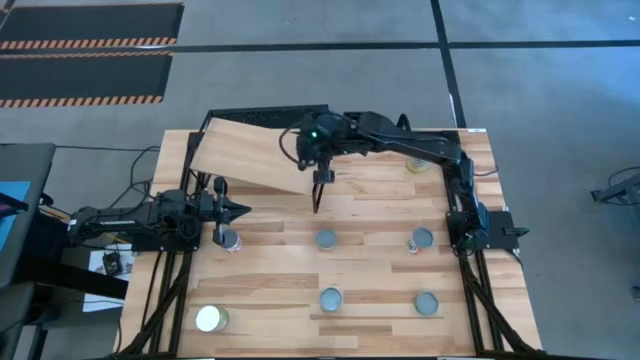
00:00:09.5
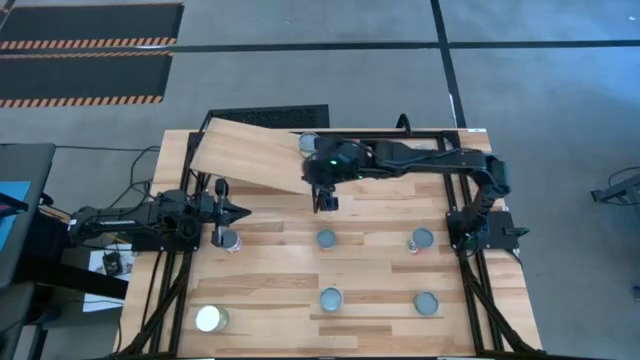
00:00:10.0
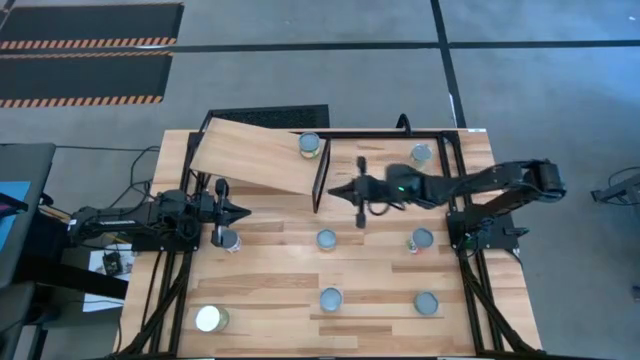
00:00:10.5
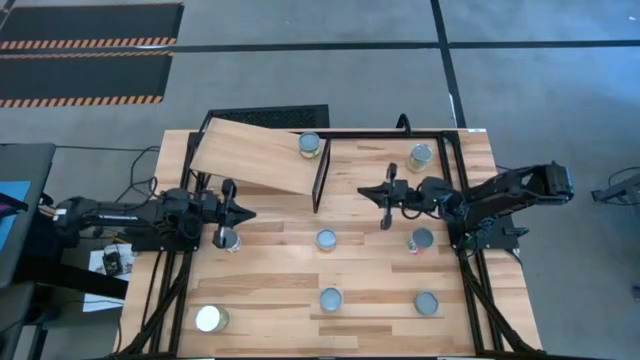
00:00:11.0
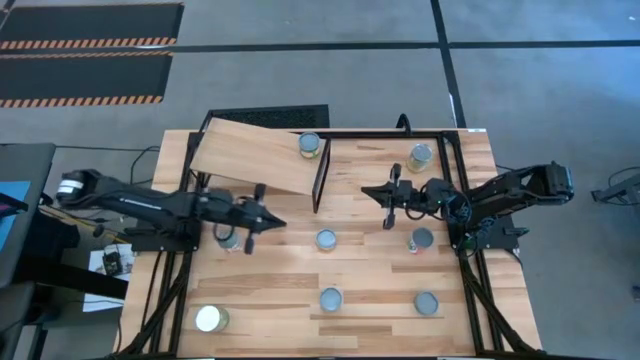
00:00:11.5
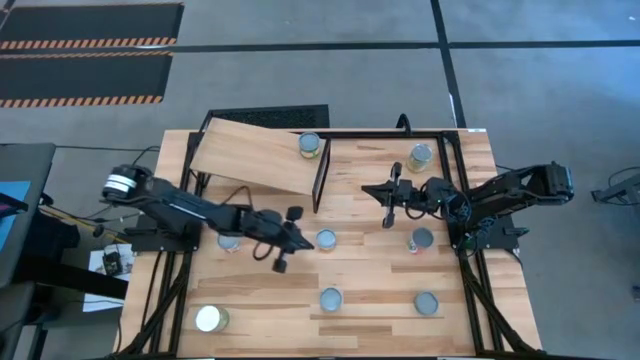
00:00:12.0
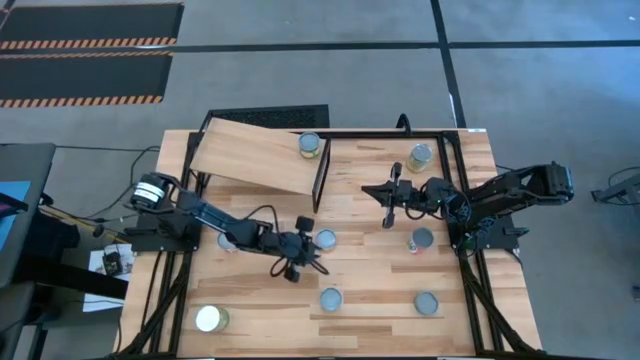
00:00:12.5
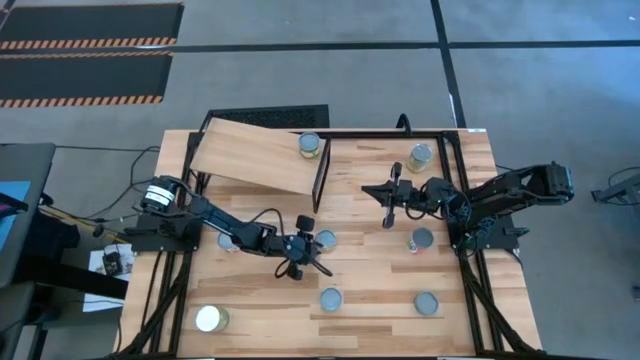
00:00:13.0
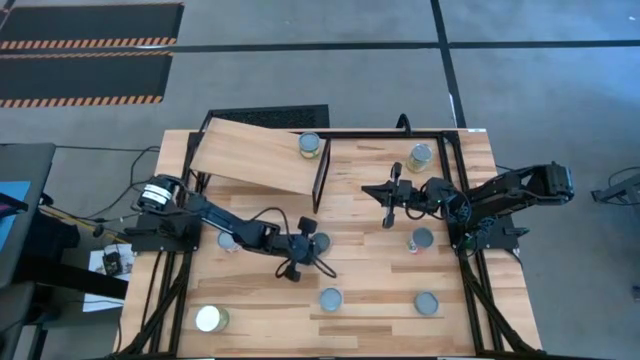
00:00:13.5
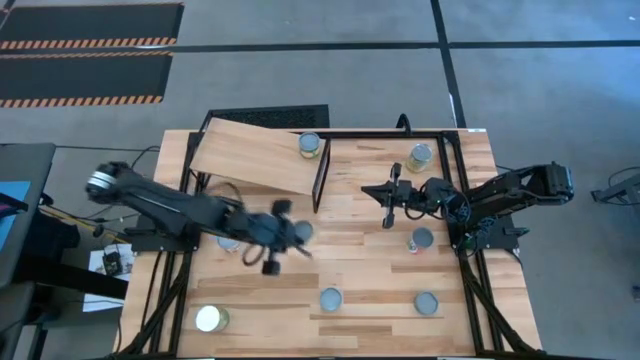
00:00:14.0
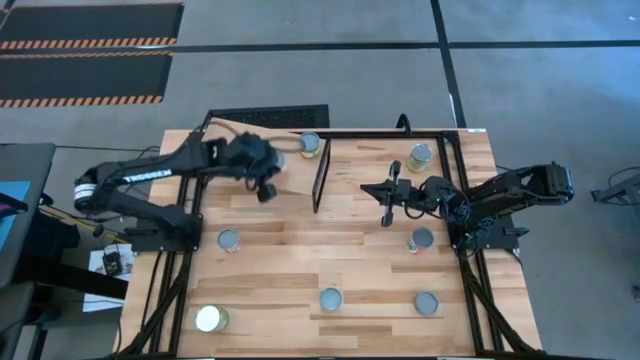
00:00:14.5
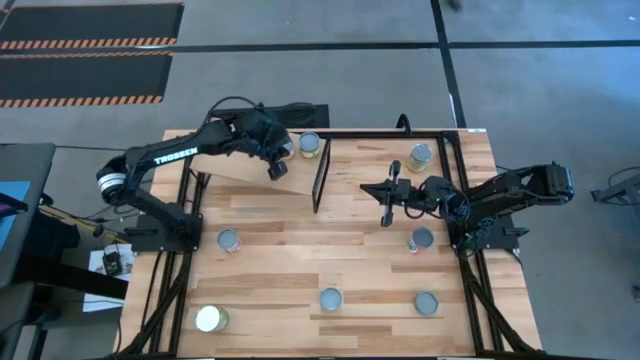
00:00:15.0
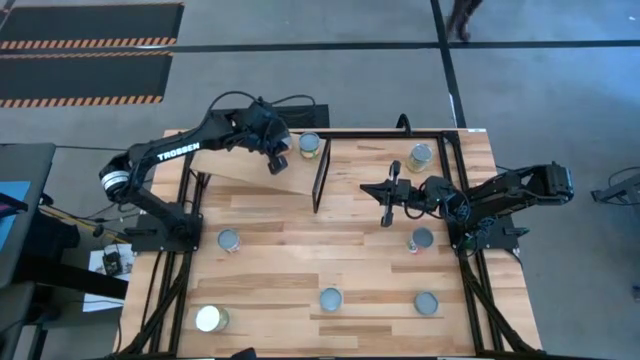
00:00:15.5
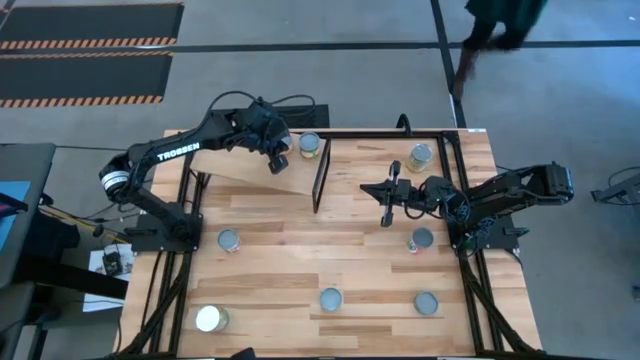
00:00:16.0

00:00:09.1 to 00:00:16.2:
Task: Pick and place cans onto a shelf
Put the canned mushrooms on the shelf

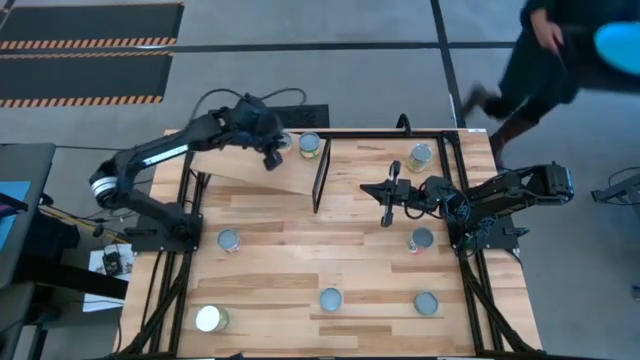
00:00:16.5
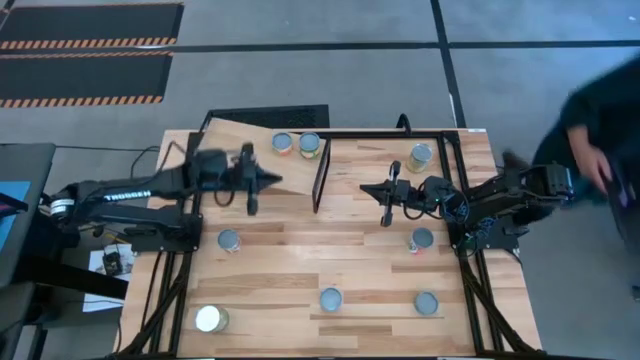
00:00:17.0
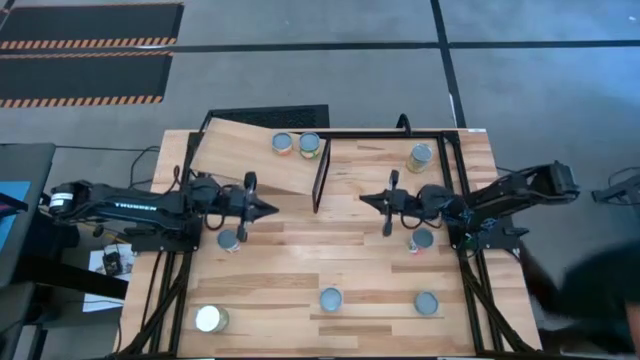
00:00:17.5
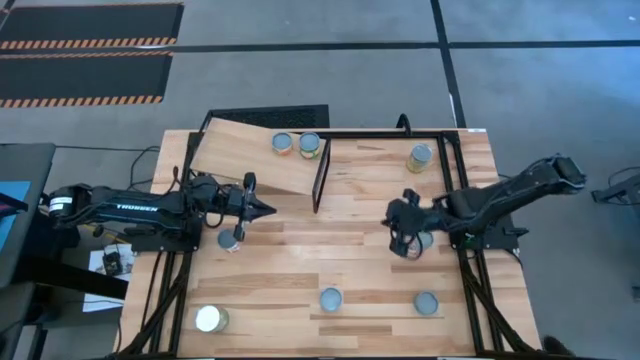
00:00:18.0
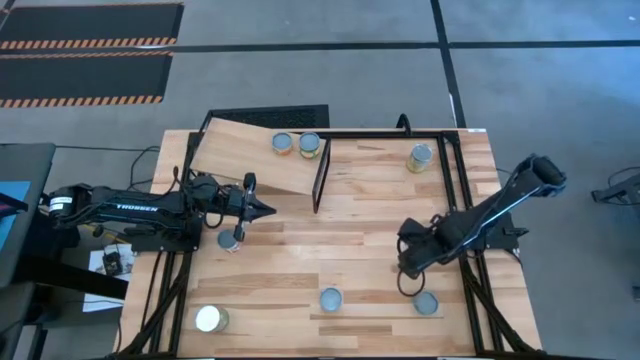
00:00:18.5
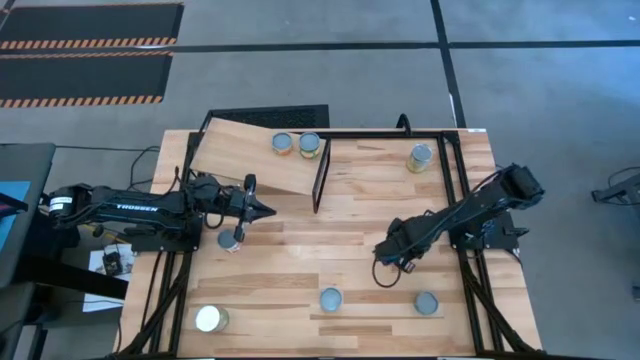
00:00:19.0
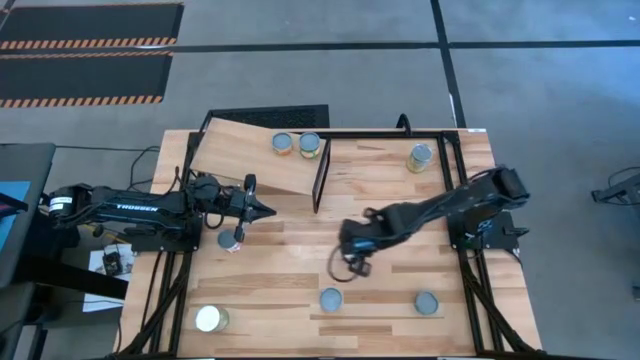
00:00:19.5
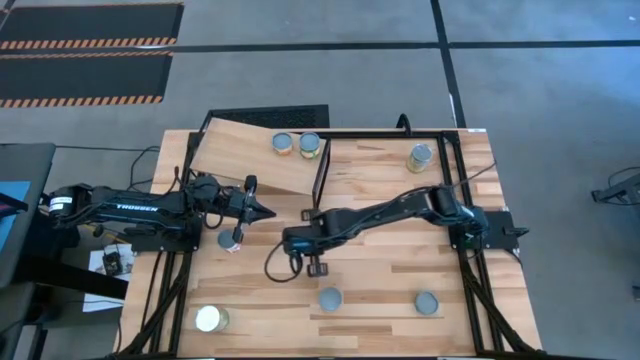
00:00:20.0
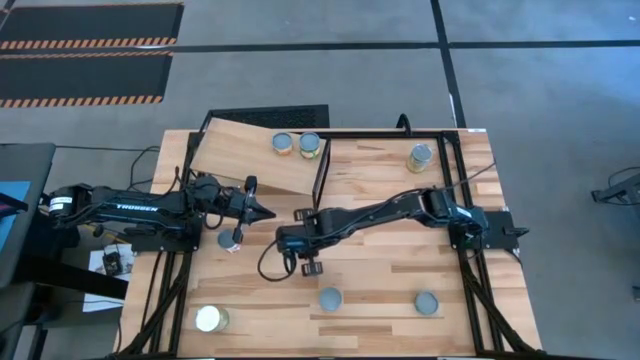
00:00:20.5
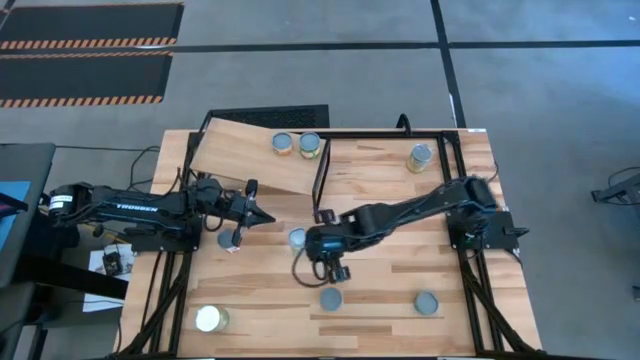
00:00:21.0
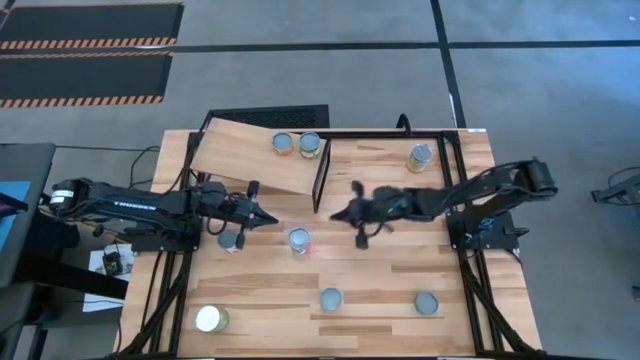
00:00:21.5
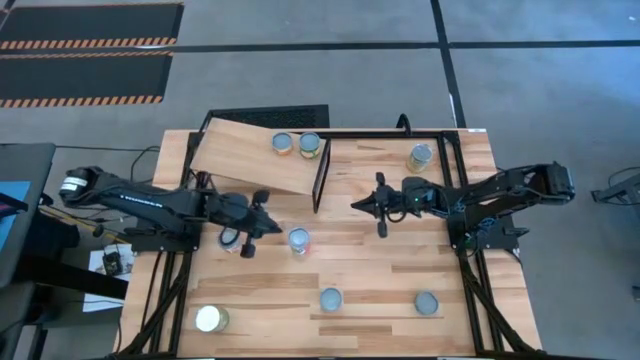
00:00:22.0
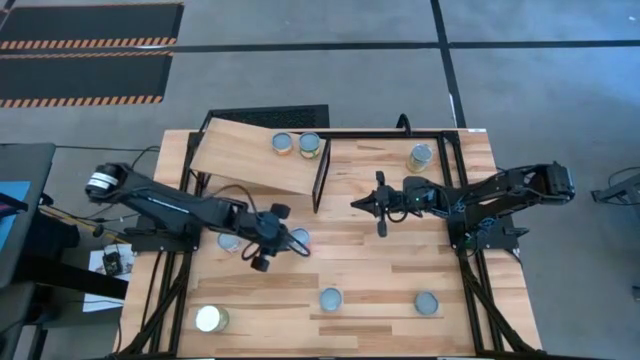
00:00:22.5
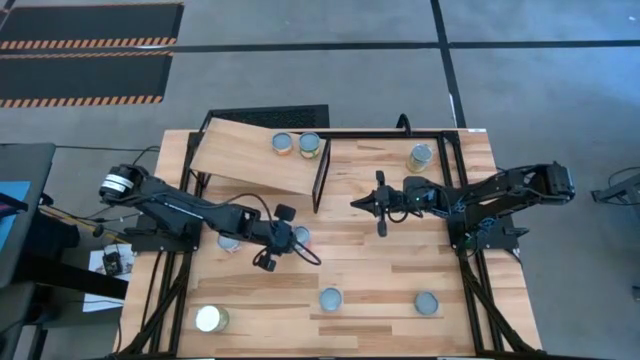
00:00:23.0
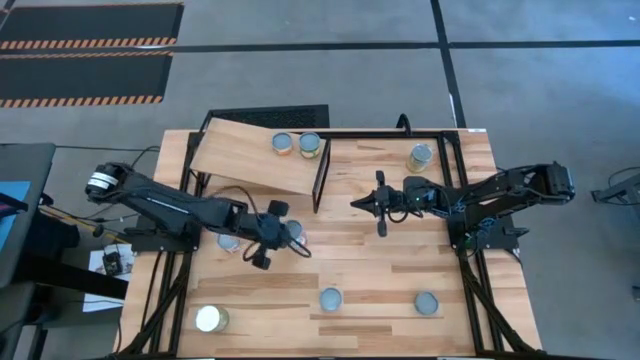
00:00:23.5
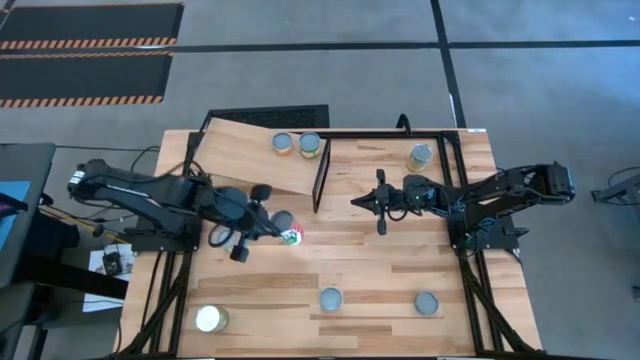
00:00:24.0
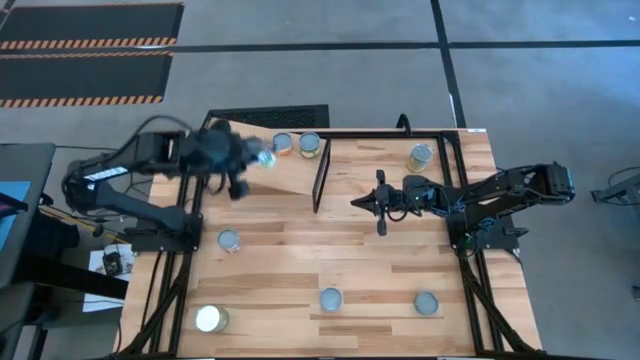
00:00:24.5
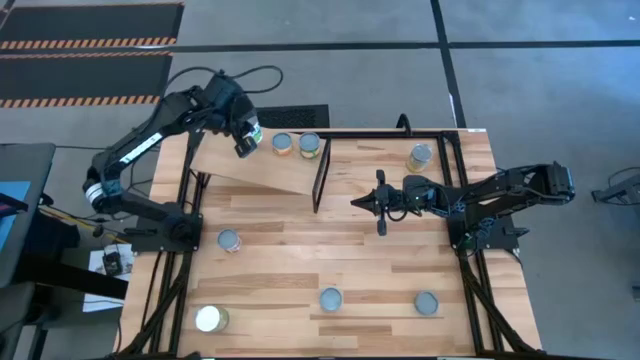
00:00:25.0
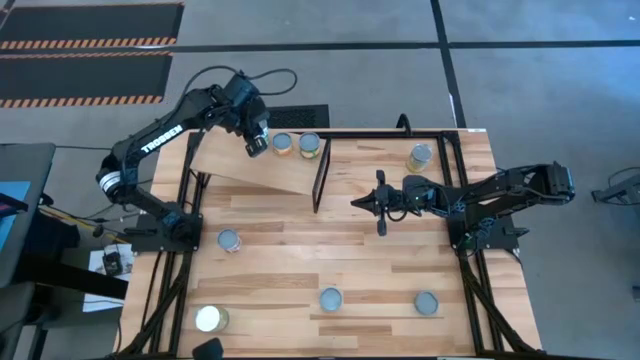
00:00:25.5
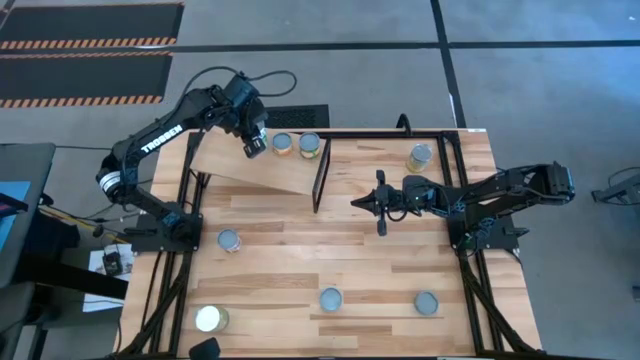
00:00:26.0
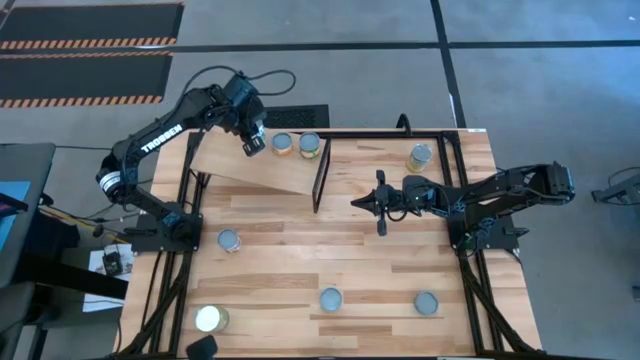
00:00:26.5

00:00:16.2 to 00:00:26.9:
Put the canned mixed fruit on the shelf

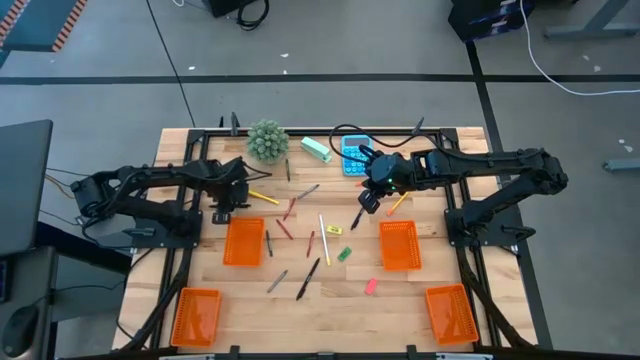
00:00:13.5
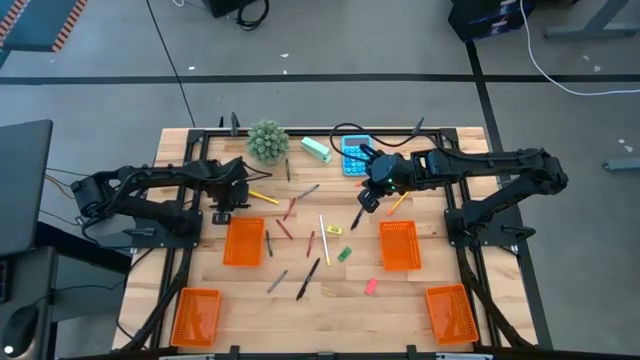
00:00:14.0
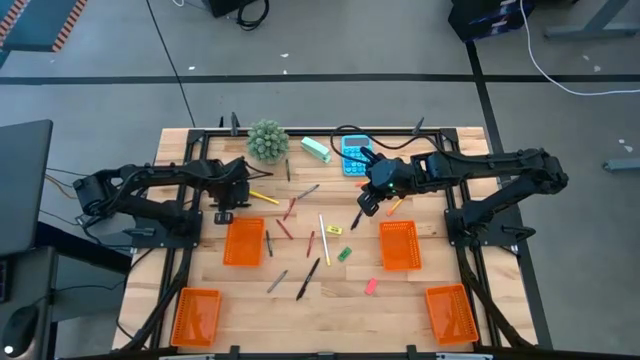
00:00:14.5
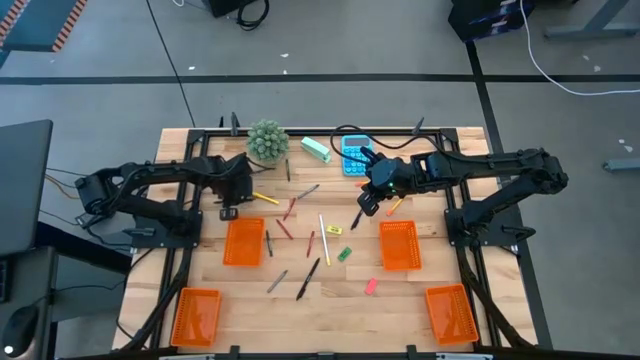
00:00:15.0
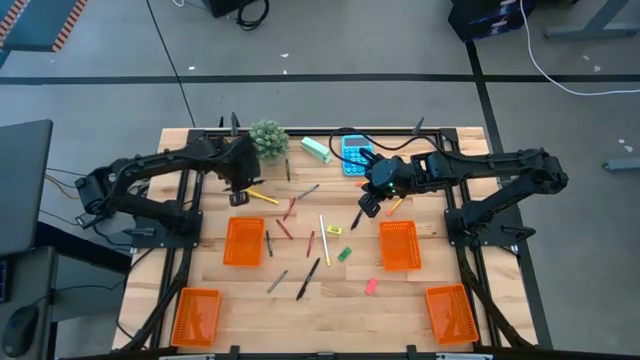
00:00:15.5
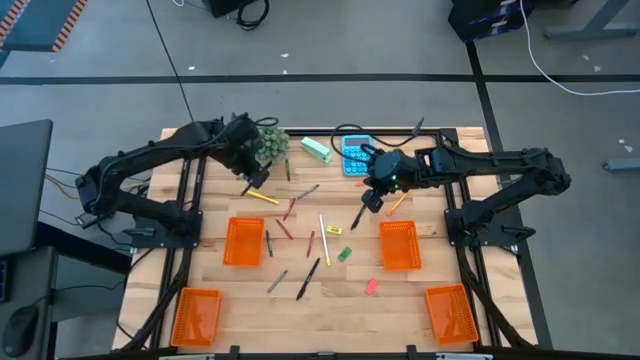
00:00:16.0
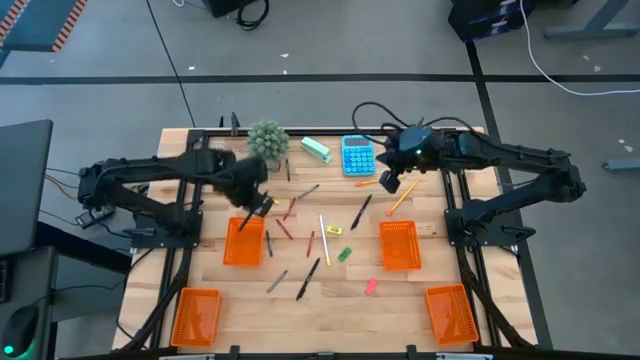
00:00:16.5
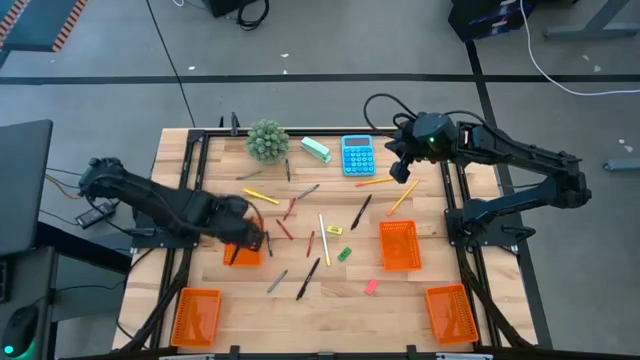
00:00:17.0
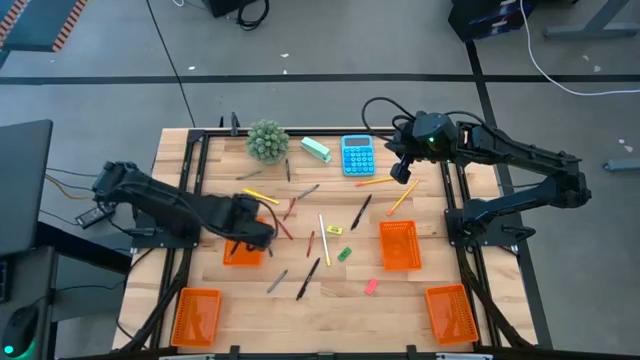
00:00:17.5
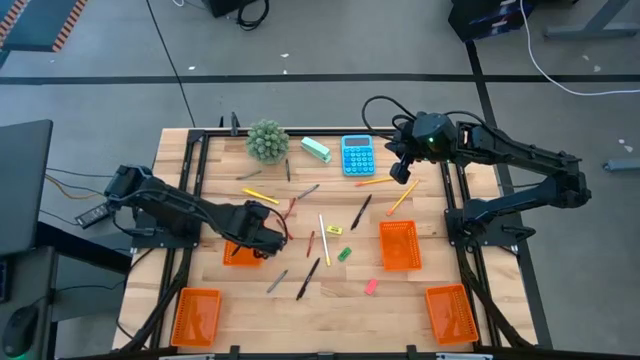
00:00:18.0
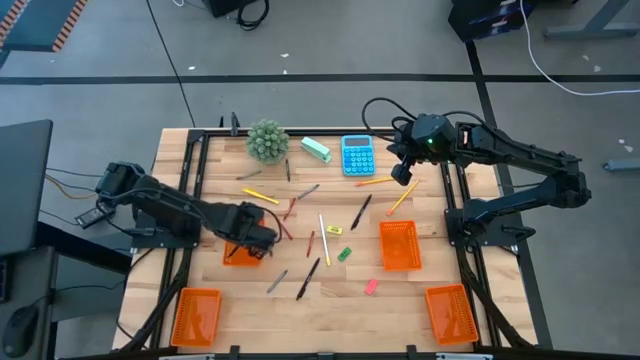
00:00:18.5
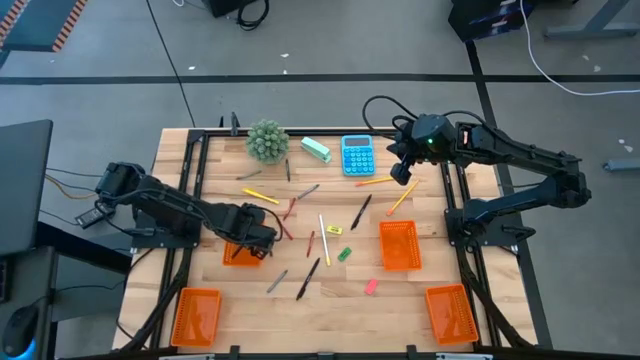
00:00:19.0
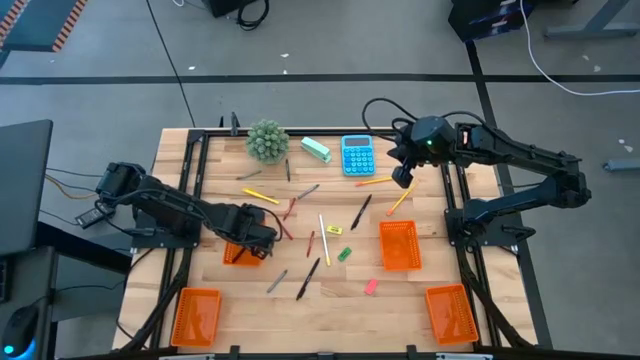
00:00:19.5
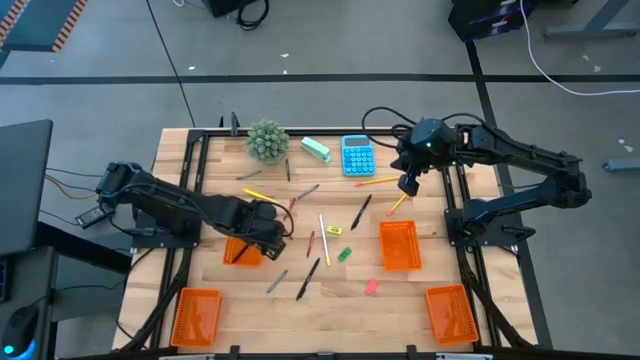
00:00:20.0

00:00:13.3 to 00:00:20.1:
Task: Sort crayons/erasers/pens/pencils in bins
Put the top left black ballpen into the top left orange basket
